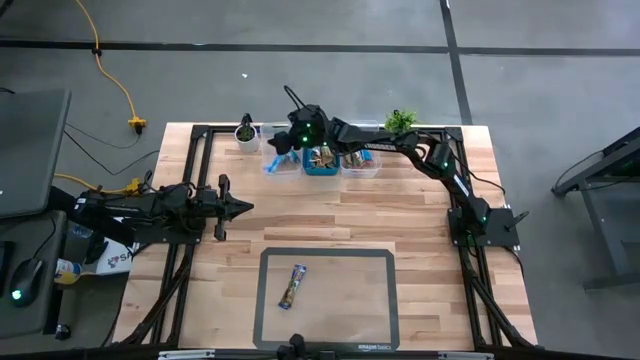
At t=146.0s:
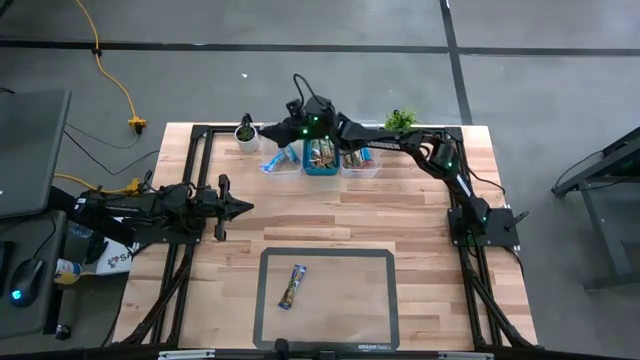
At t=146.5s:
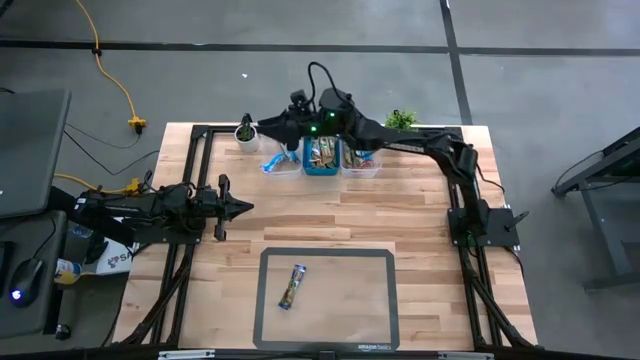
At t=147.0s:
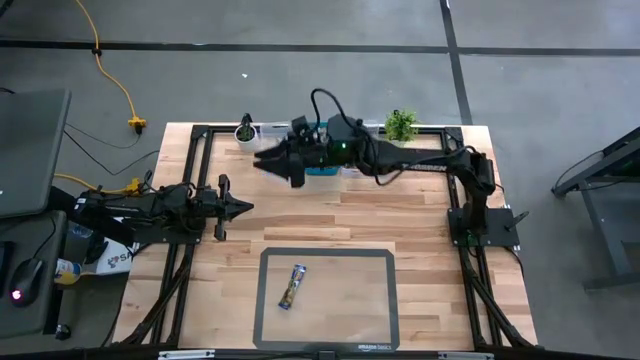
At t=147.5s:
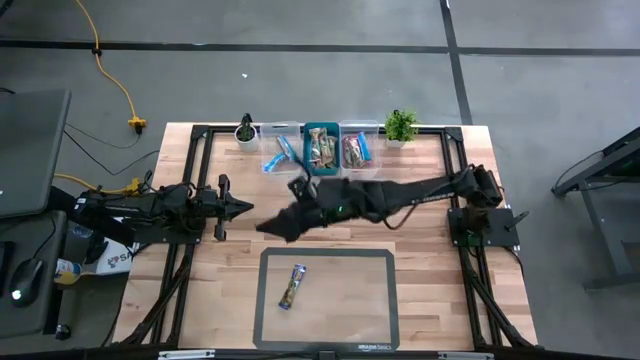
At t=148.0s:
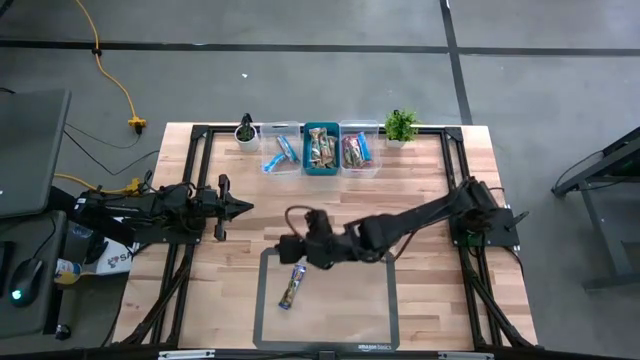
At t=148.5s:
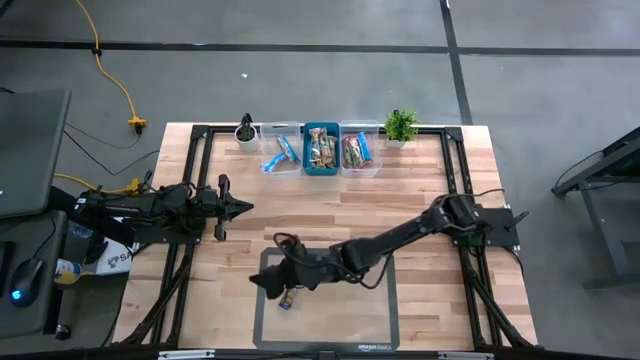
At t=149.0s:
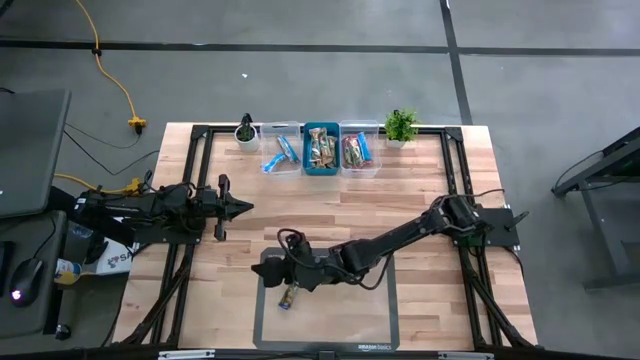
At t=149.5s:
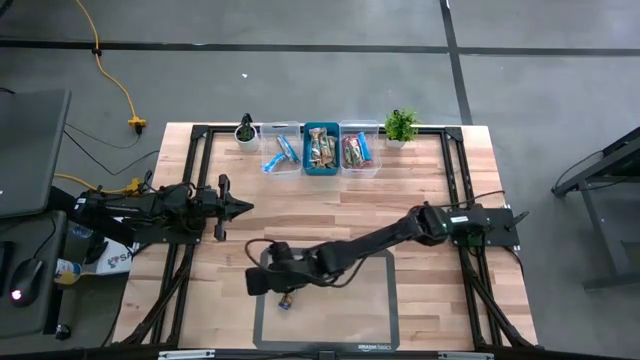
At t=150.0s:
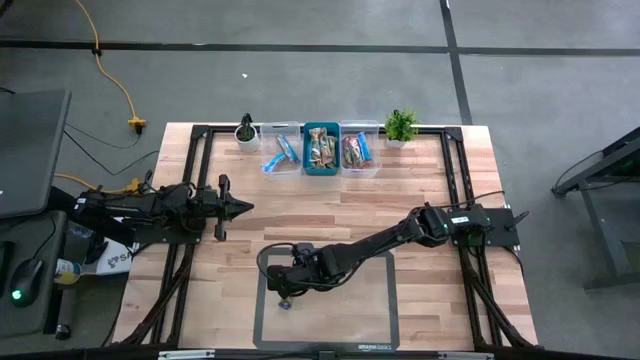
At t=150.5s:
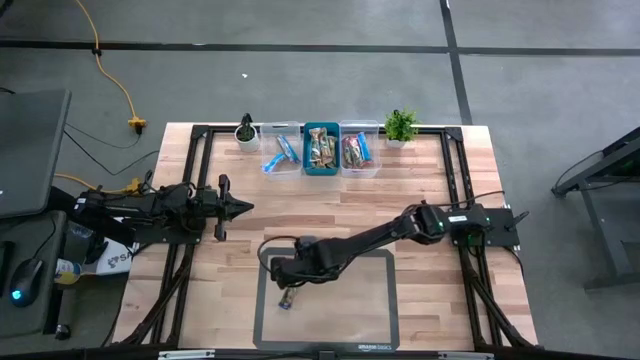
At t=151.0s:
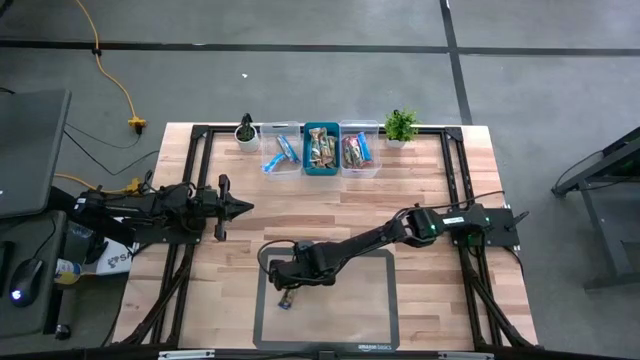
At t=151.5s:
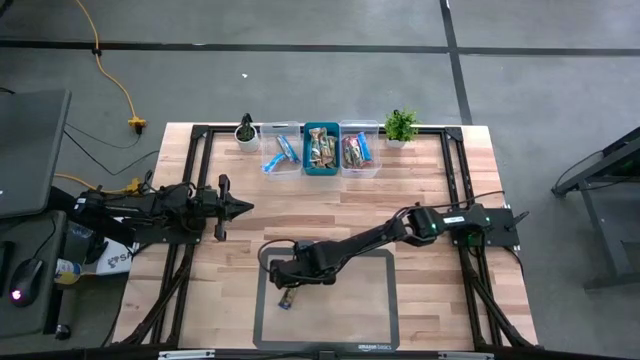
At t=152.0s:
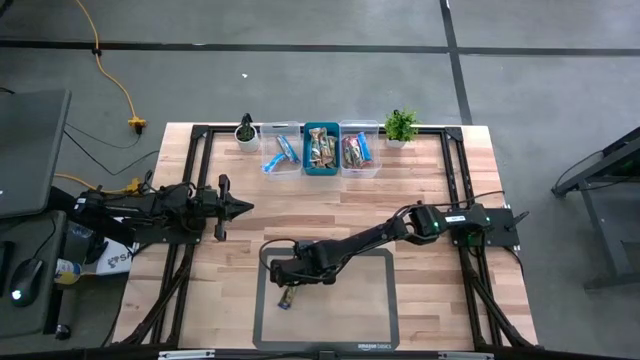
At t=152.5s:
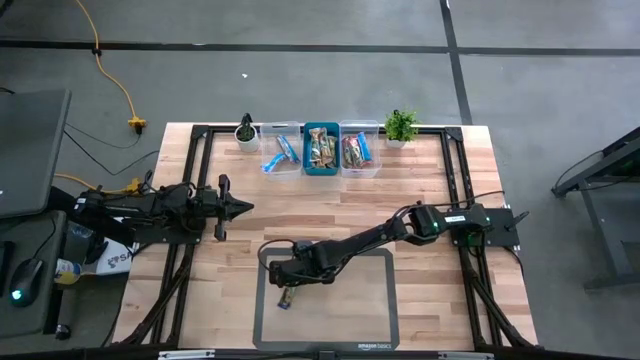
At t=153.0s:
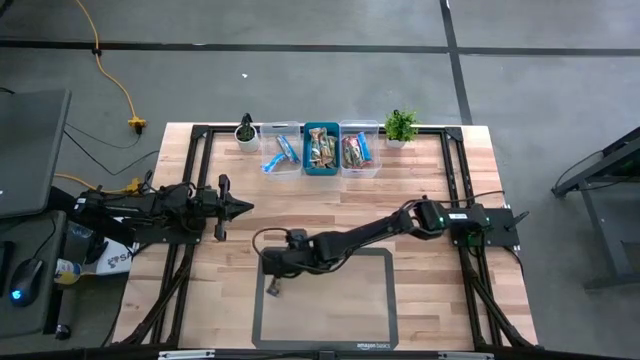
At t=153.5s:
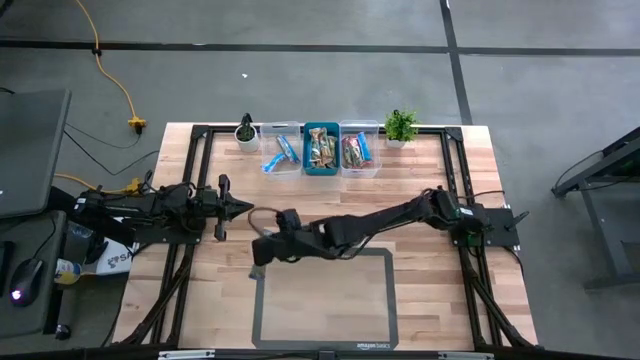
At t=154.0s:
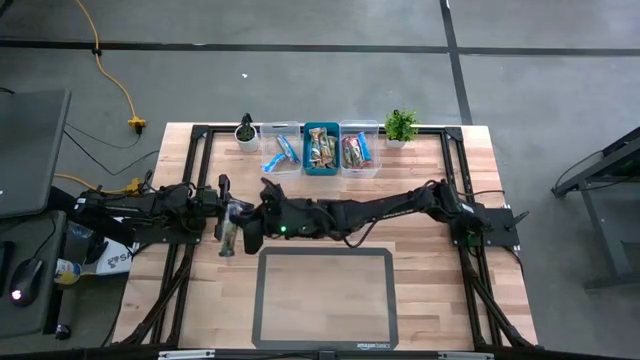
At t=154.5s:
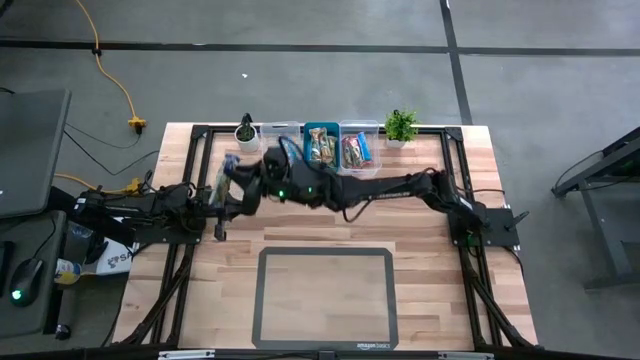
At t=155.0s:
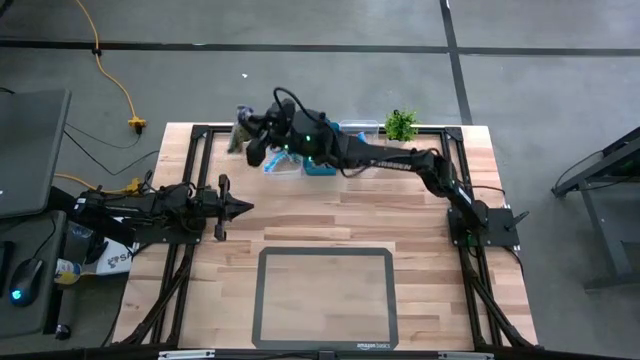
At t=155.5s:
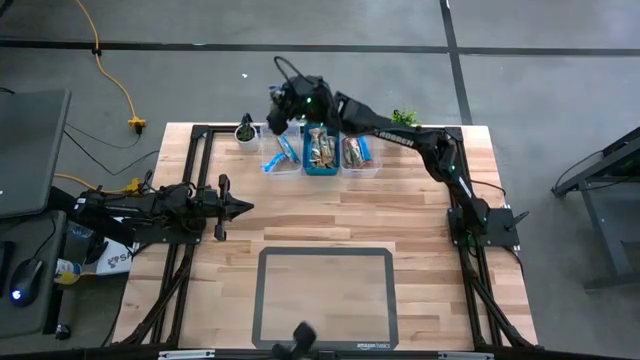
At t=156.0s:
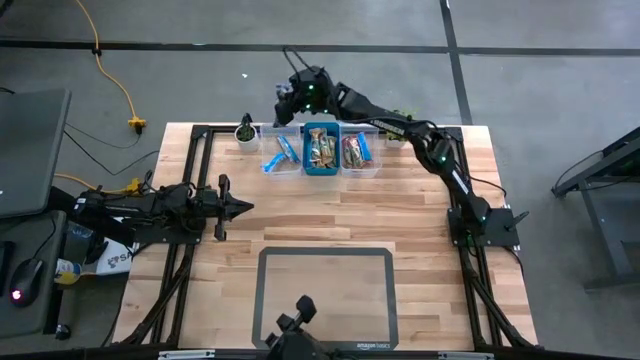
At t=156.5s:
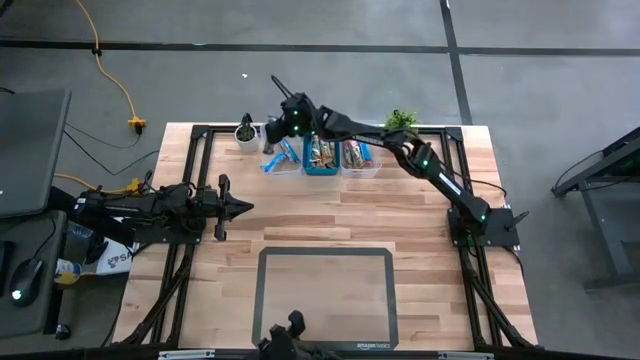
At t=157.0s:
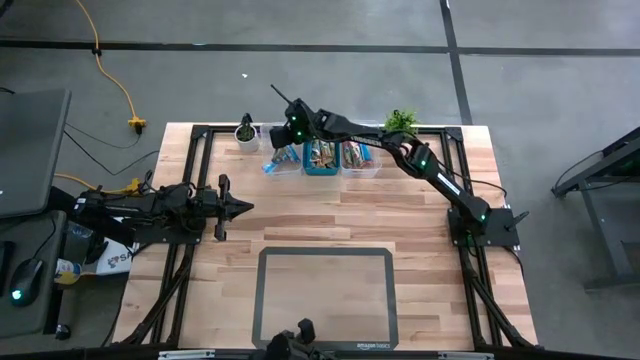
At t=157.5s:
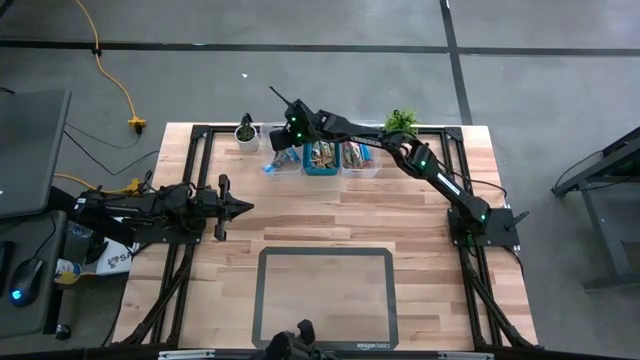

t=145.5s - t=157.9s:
Task: Pick and place Granola Bars by type
Put the blue granola bar into the left transparent bin

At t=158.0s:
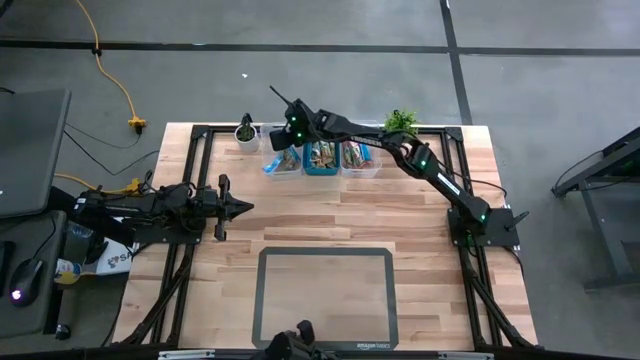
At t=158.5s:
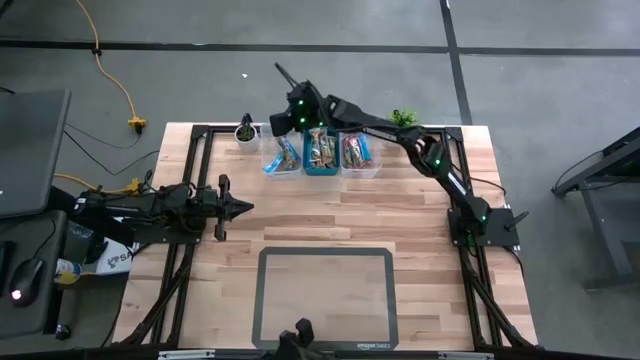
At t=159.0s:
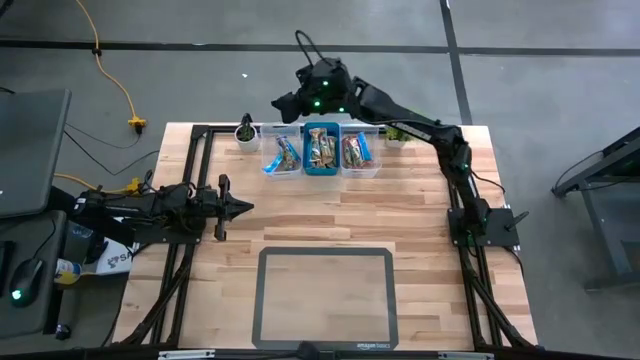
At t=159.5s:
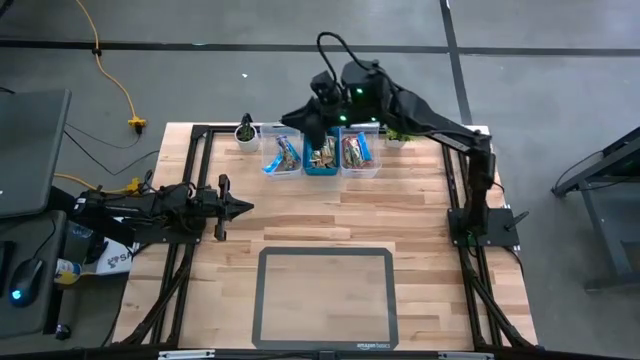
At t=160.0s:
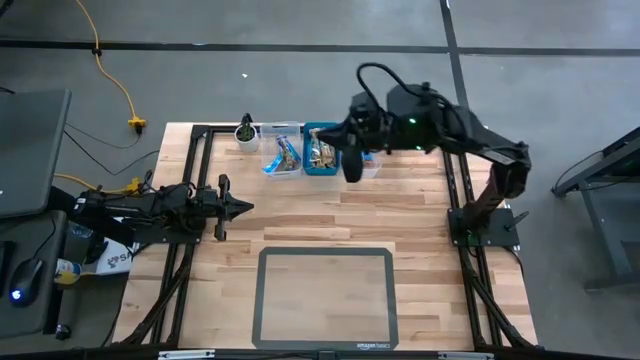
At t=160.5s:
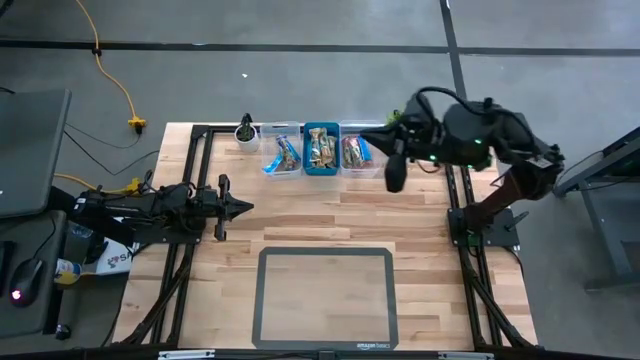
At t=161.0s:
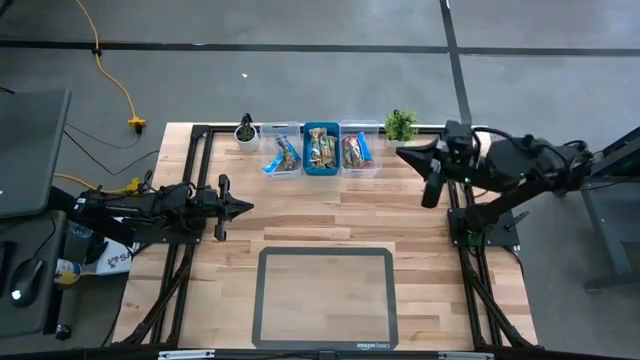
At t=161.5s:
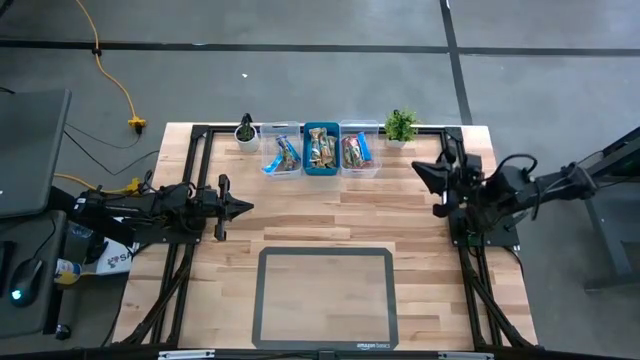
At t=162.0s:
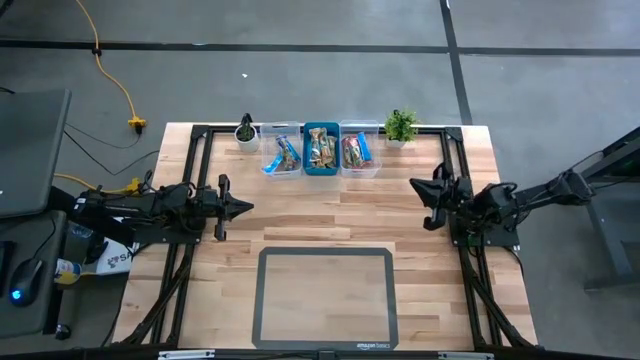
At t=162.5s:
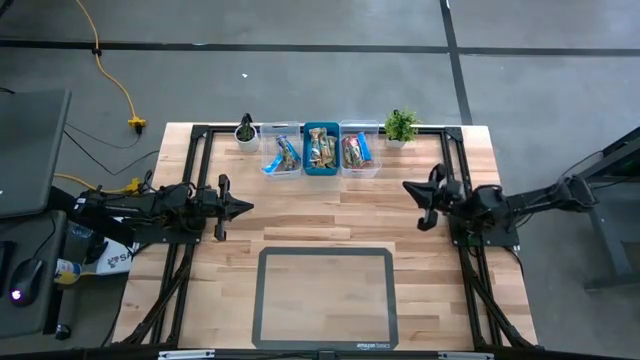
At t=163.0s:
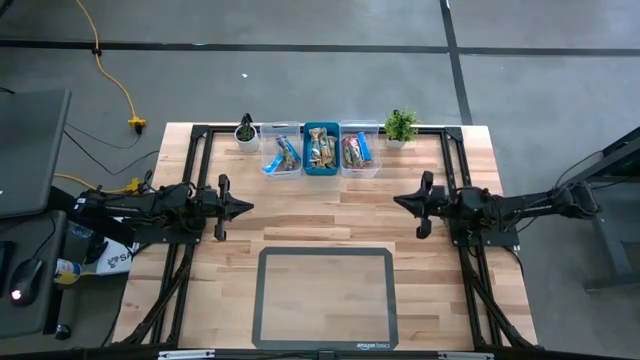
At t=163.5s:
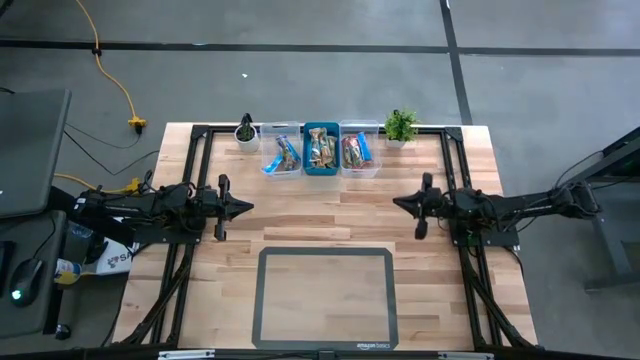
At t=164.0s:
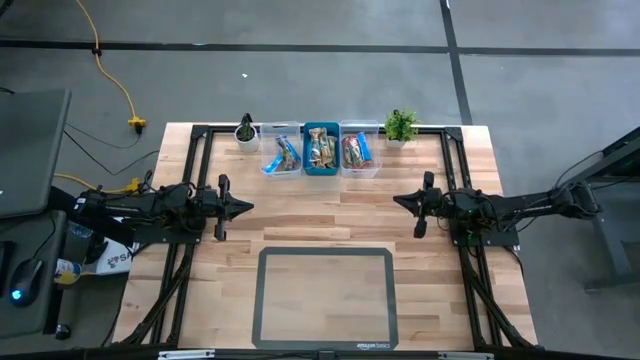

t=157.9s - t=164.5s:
Return to Home Position

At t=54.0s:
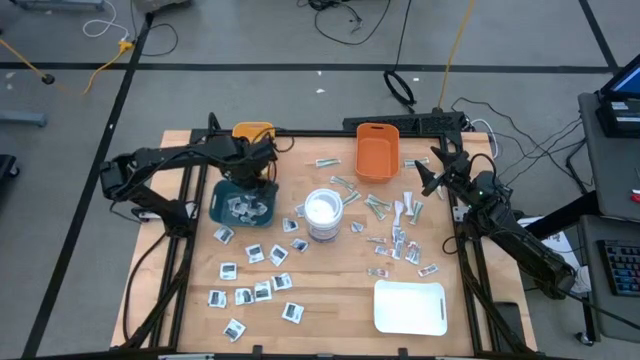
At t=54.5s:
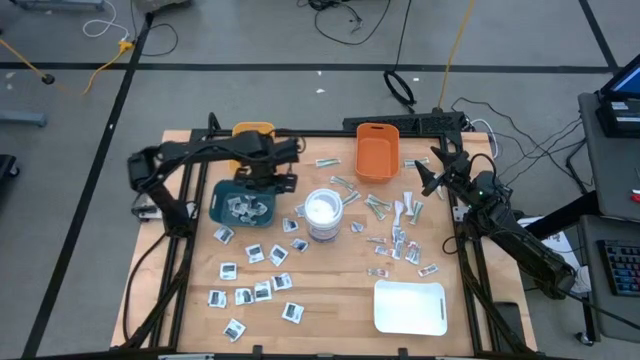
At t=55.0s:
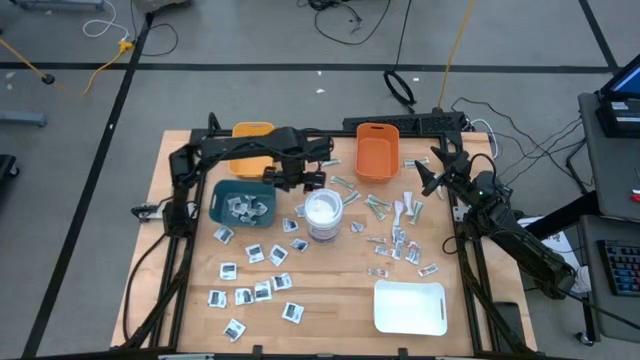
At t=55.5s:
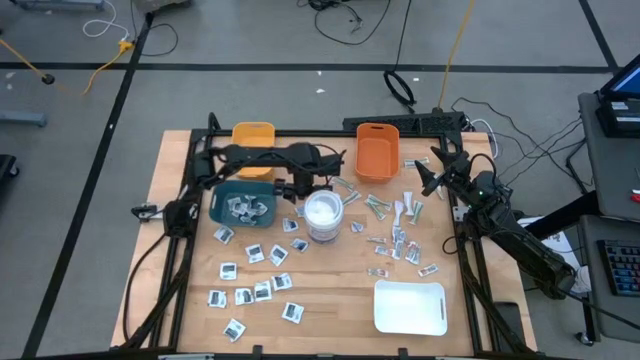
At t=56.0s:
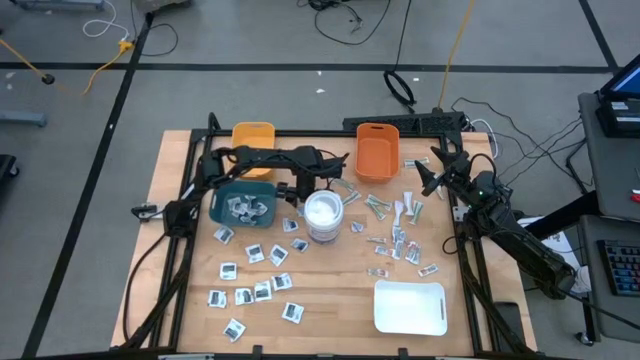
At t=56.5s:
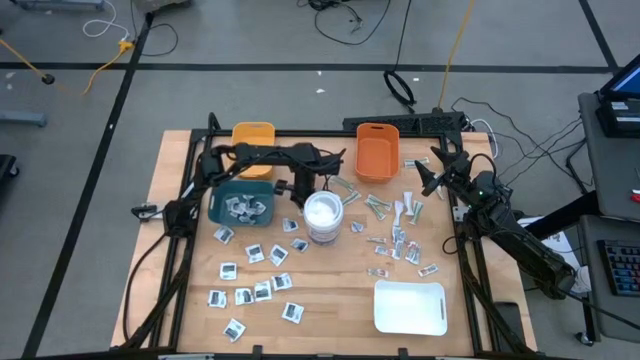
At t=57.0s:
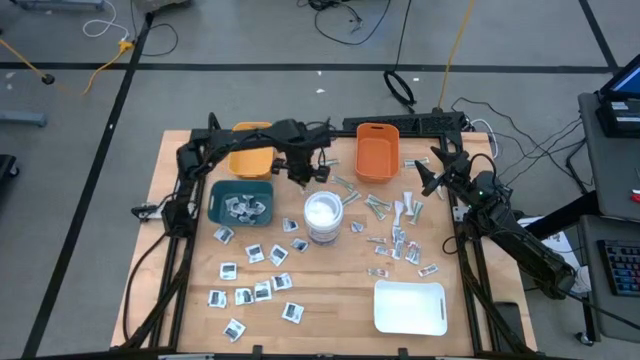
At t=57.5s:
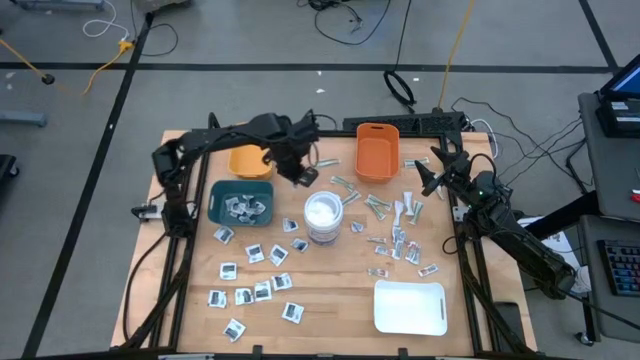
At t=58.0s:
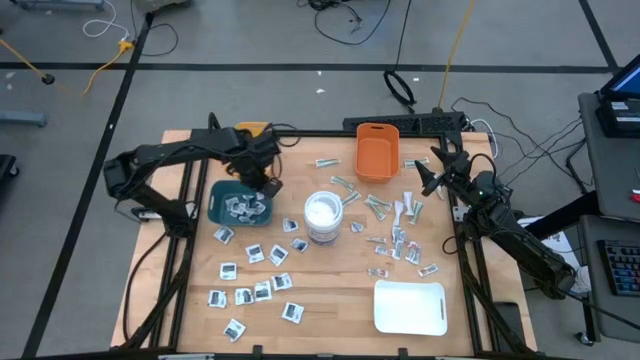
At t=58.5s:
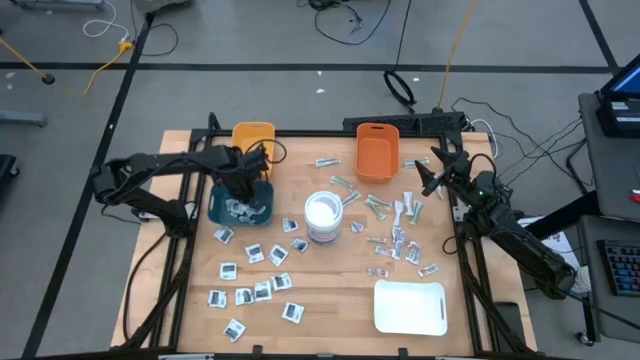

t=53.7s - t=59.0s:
Task: Pick & Place First Aid Supplies
Put the blue pad into the blue bin
